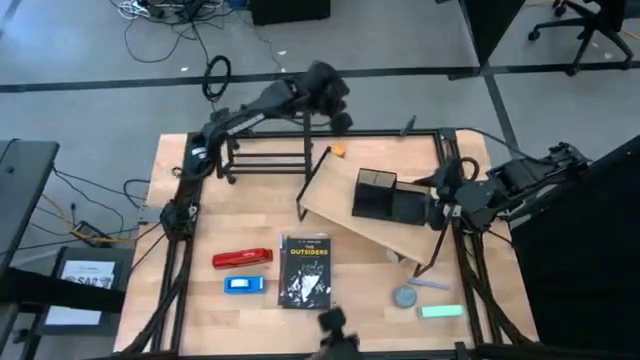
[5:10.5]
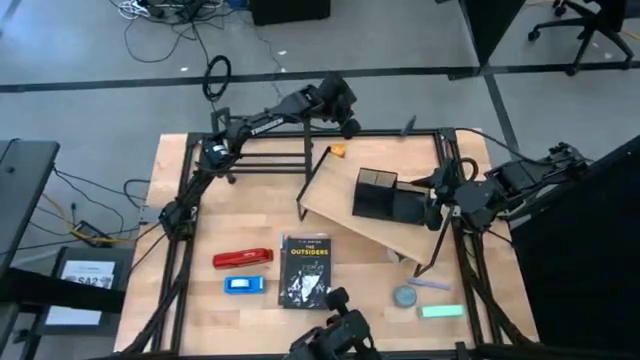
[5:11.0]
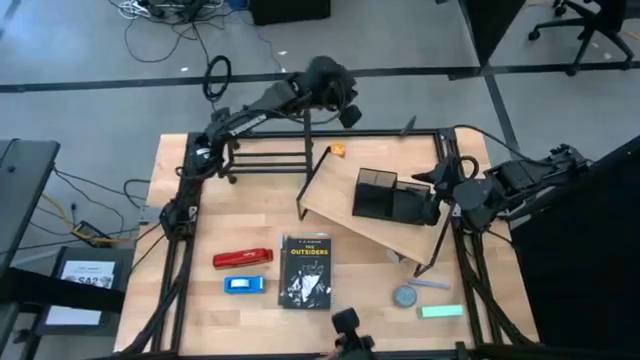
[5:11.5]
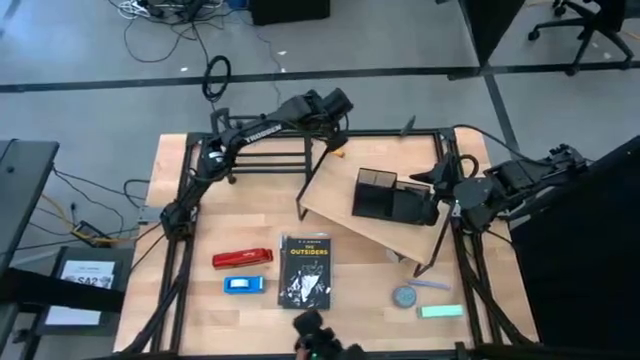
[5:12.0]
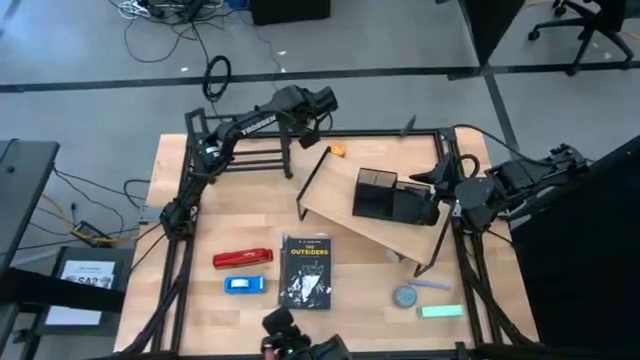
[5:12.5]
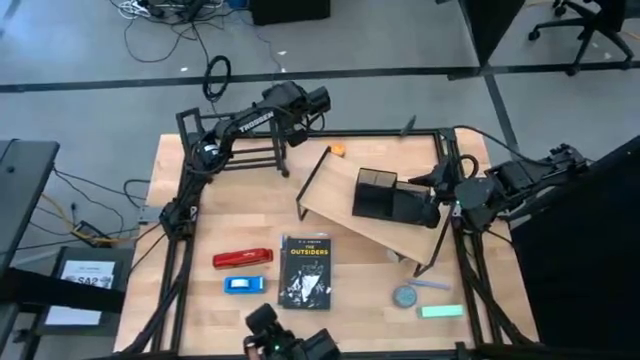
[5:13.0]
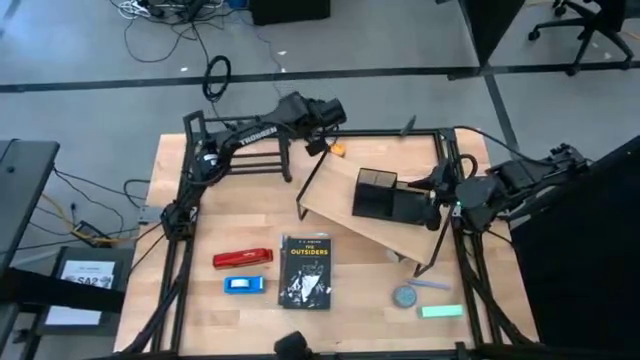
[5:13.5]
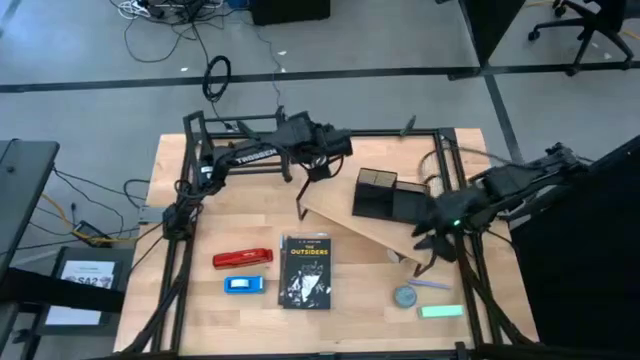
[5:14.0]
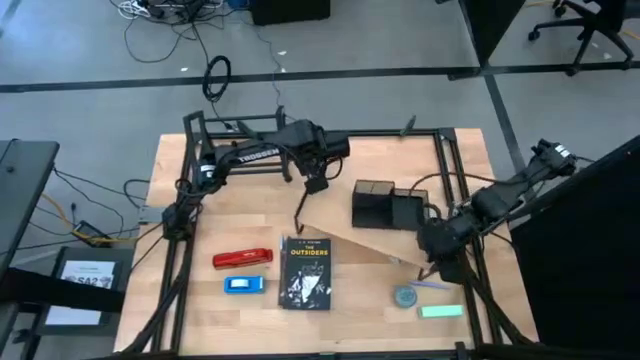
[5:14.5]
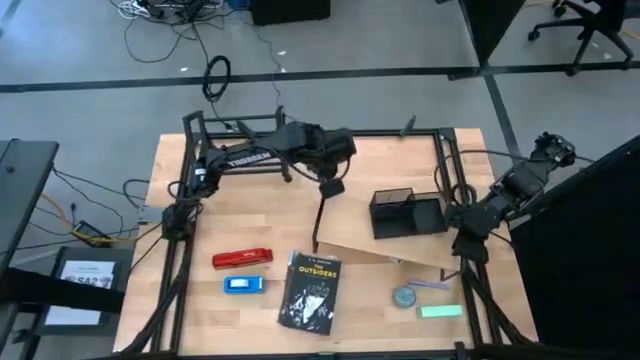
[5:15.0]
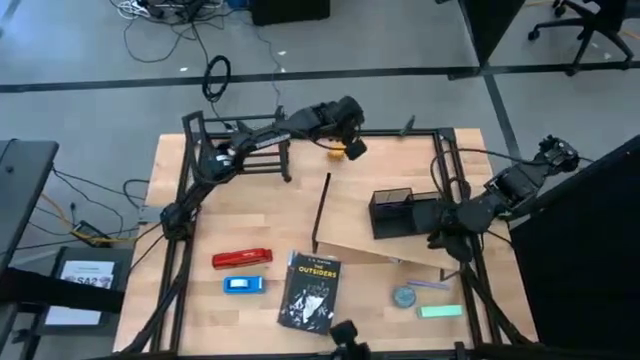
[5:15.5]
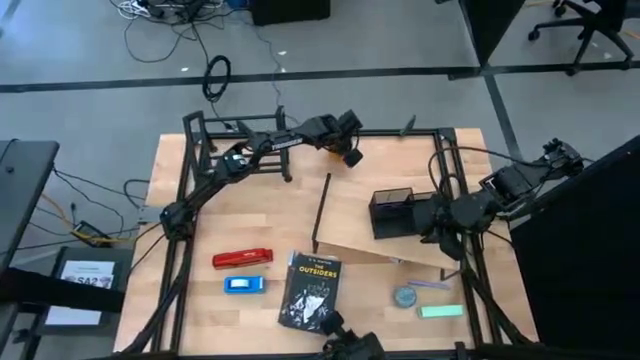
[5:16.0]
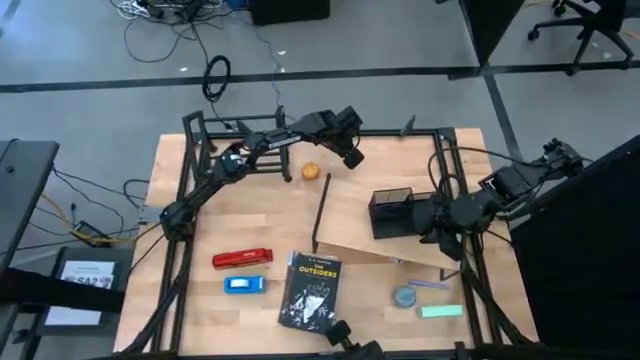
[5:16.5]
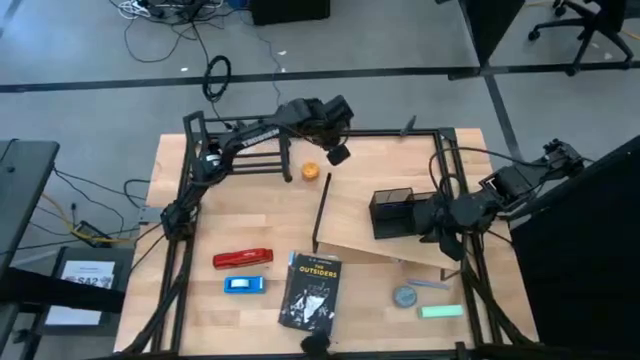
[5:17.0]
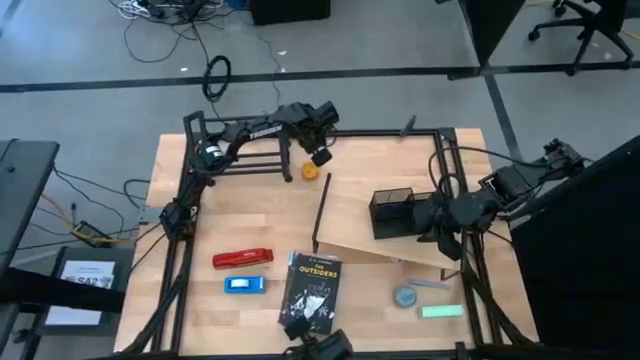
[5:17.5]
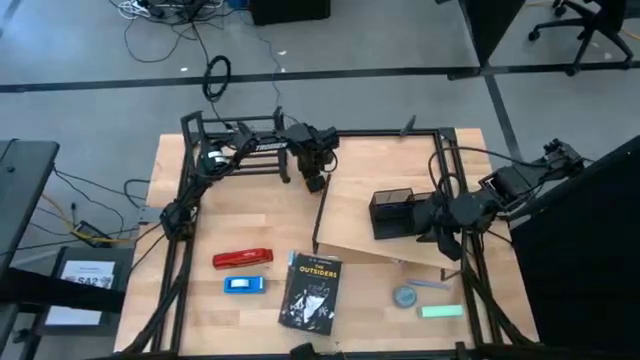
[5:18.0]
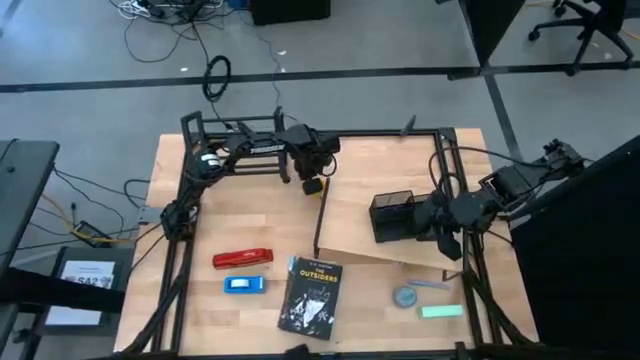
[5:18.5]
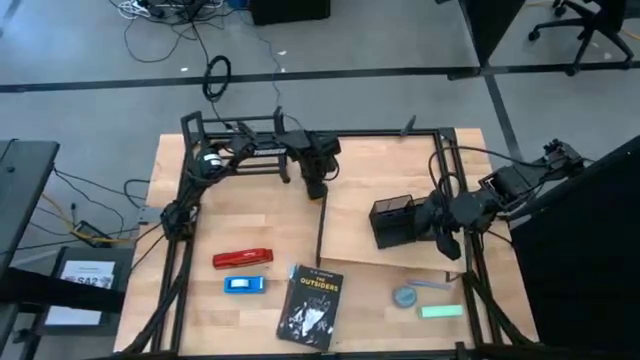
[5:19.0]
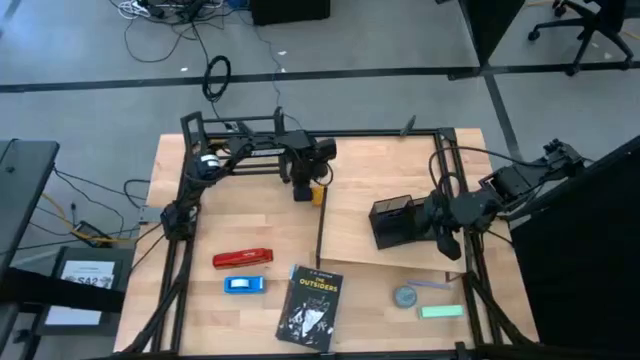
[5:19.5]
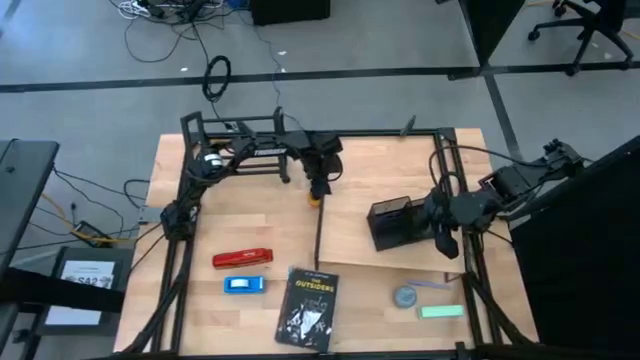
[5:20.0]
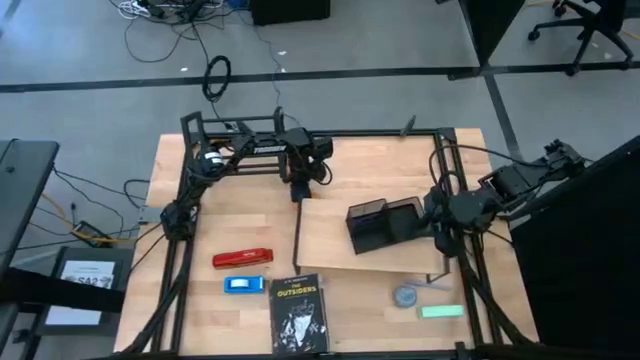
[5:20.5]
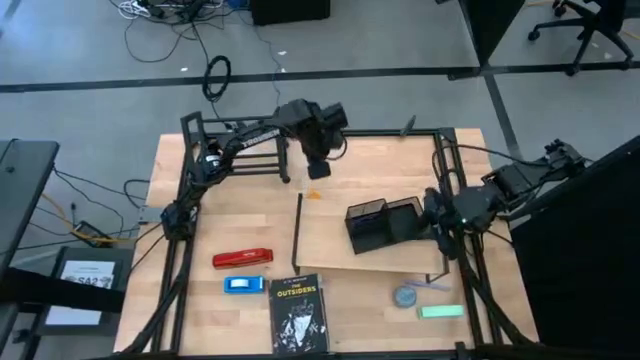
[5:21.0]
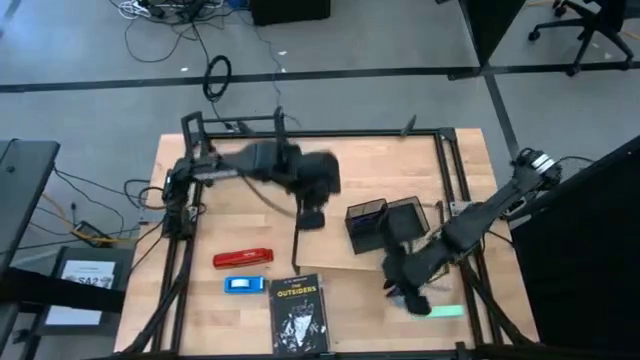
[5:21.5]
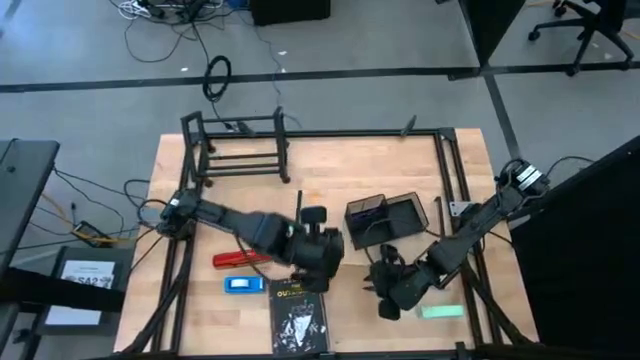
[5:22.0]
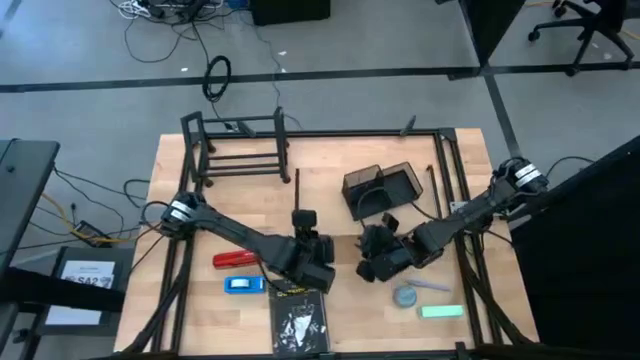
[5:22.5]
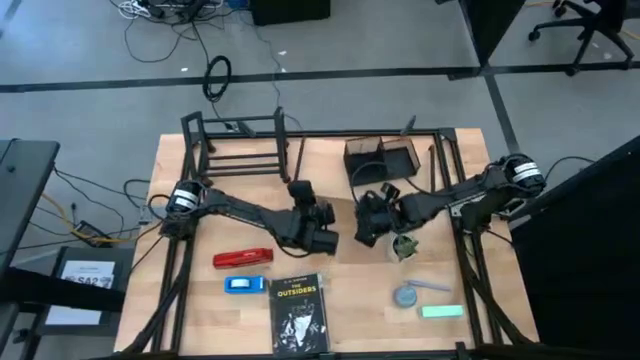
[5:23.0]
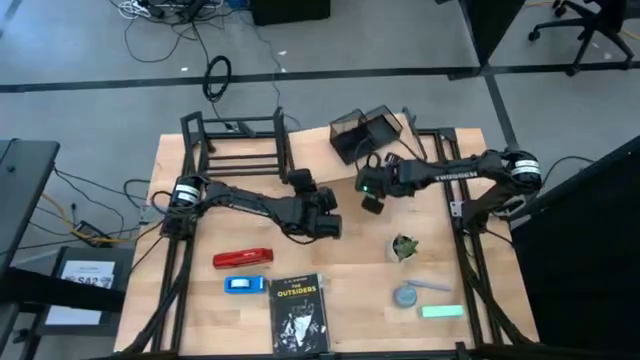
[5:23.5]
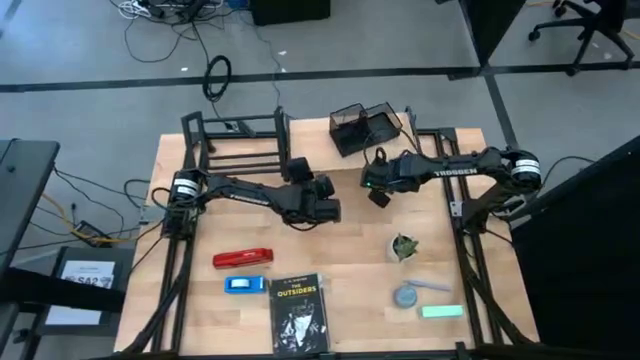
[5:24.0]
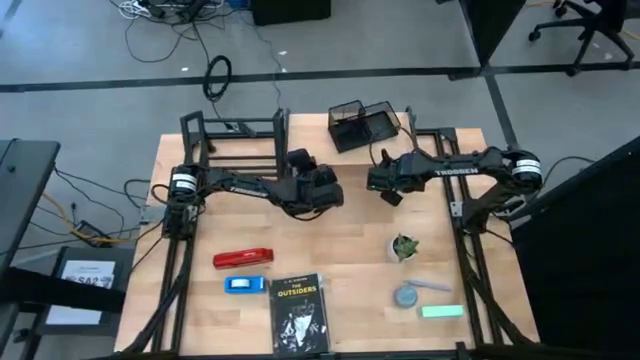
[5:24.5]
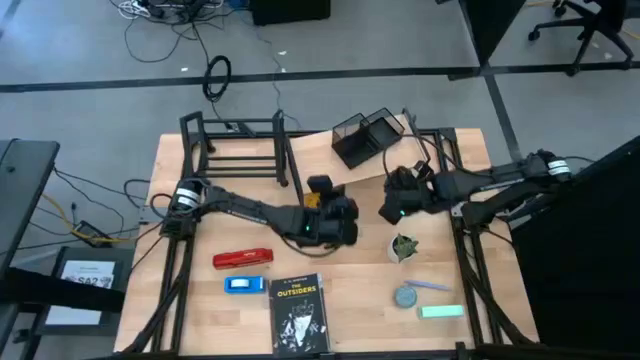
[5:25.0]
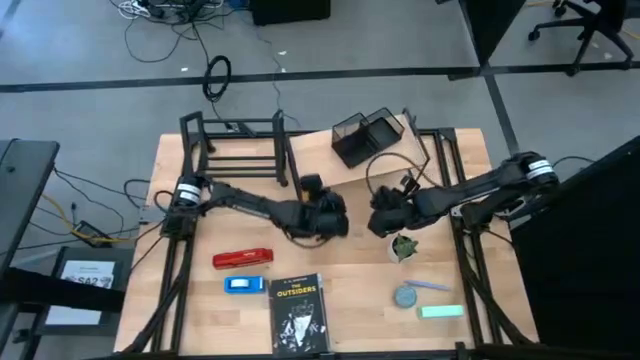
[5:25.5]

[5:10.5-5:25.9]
Task: Stock shelves
Adjust the shelf, pen holder and book shelf

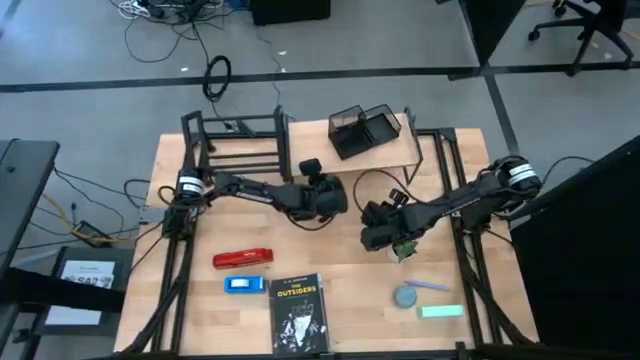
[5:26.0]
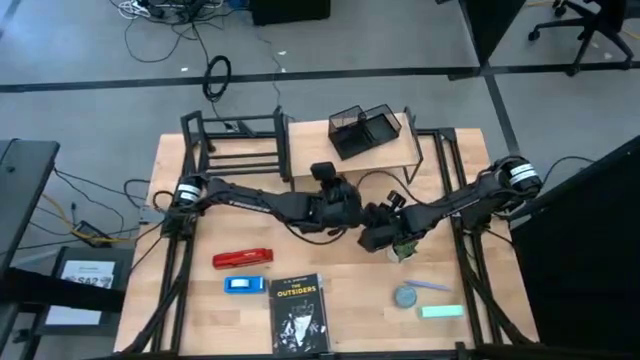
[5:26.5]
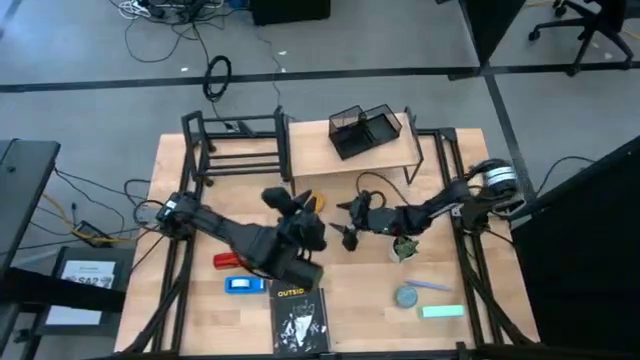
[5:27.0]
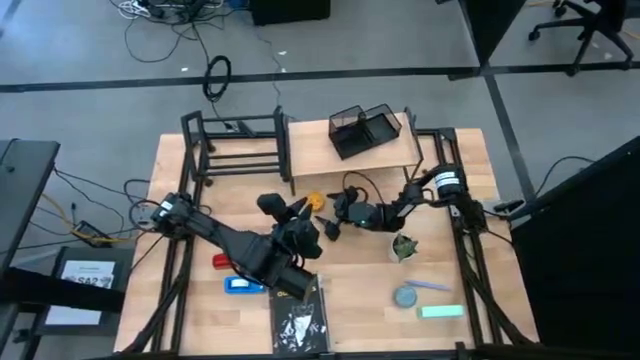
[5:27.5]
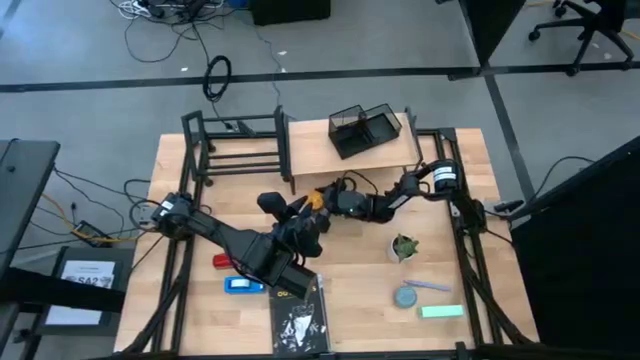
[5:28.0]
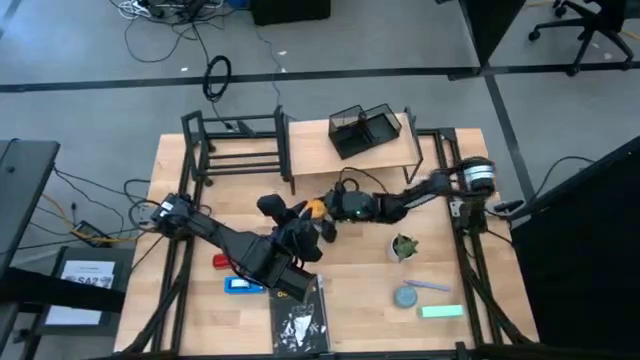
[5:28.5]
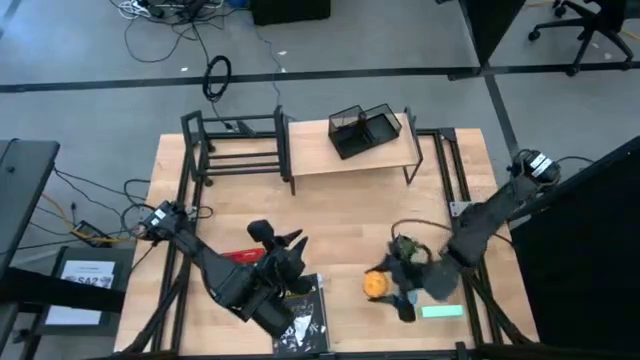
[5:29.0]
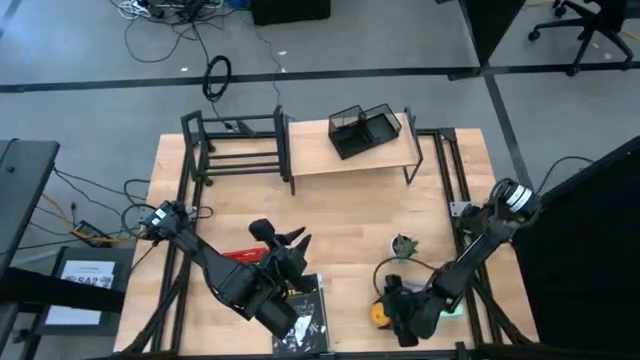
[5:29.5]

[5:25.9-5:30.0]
Remove the yellow scented candle from under the shelf

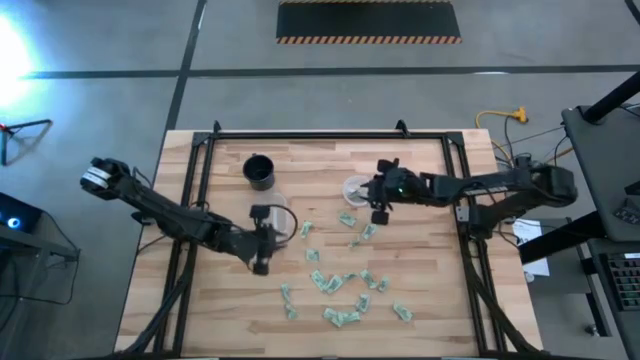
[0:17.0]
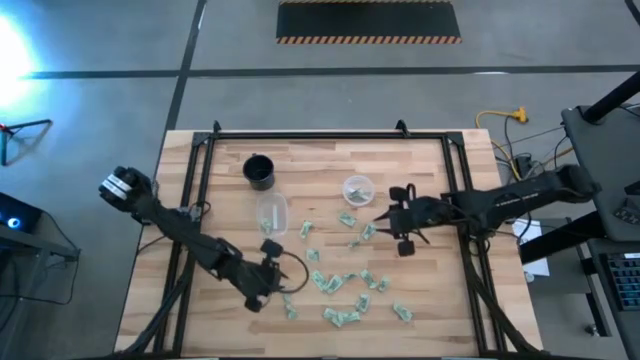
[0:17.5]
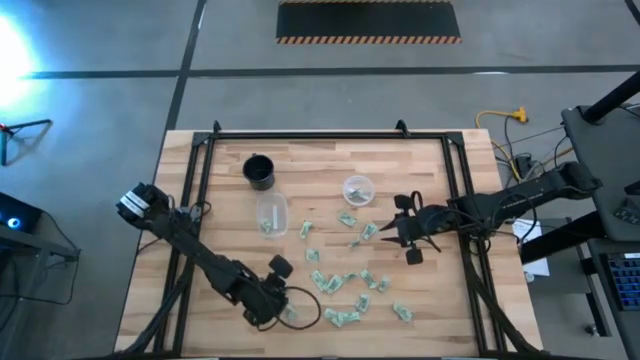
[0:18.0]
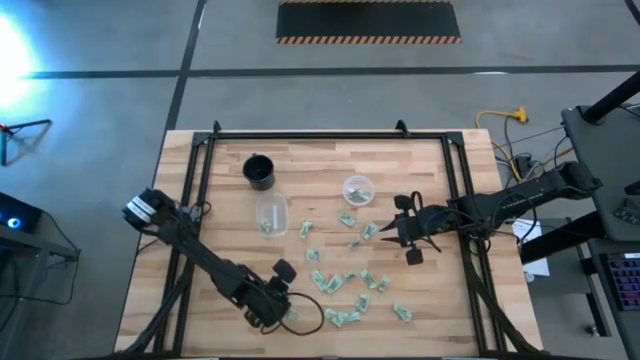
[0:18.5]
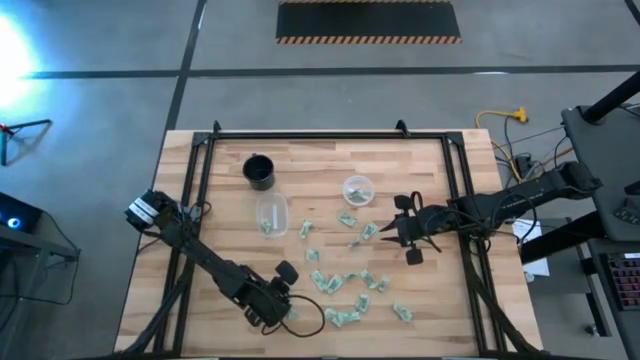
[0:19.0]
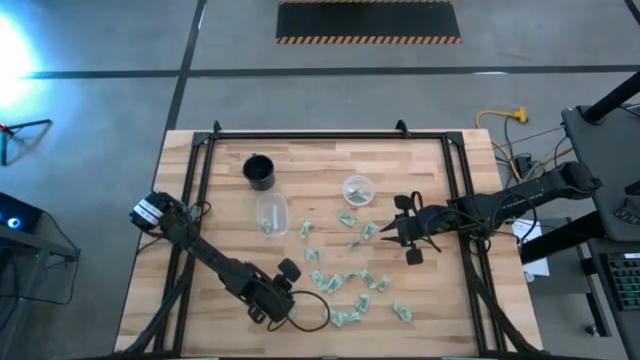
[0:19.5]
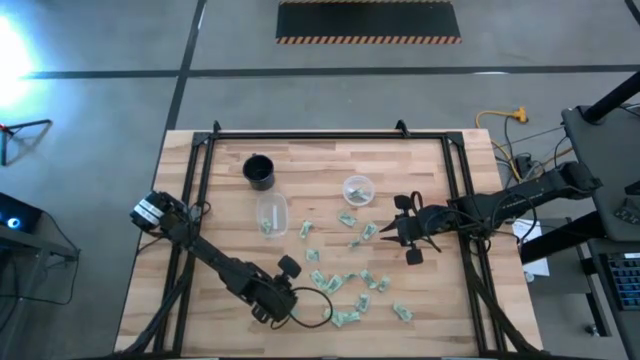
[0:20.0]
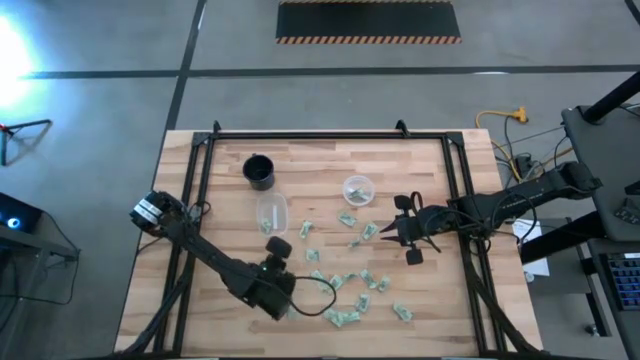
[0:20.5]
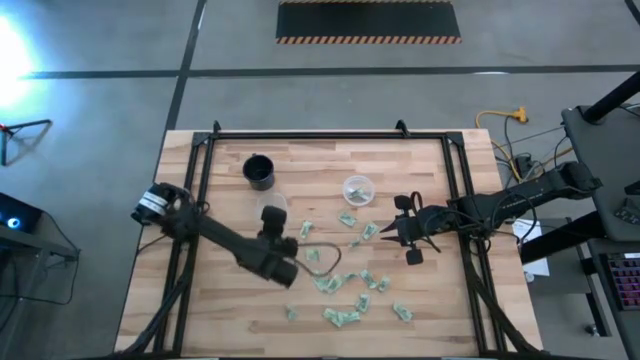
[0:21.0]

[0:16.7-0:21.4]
Task: Pick and place items into bin
Put the stevia packet into the left transparent bin
